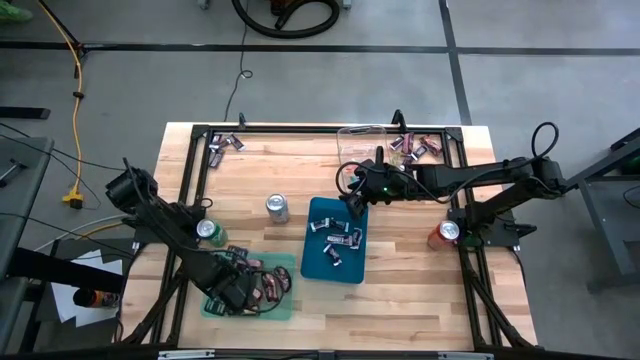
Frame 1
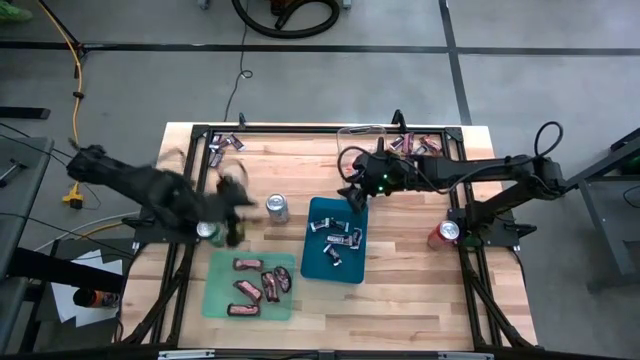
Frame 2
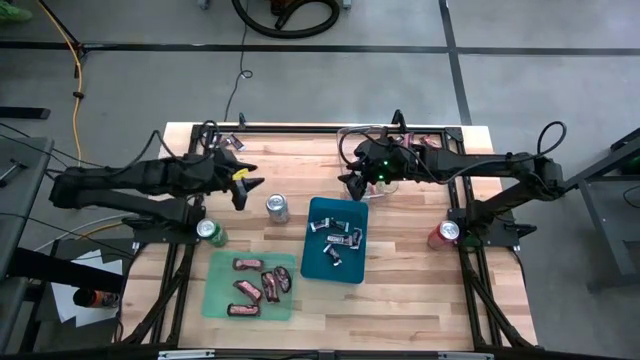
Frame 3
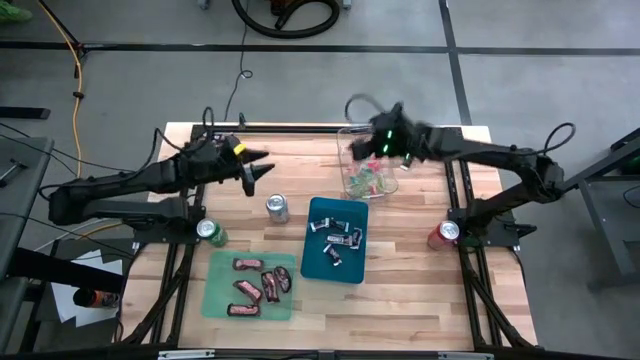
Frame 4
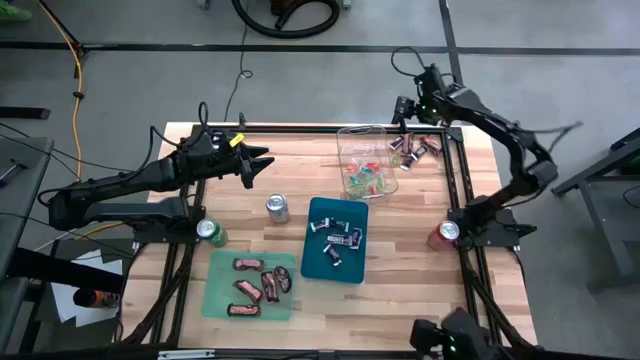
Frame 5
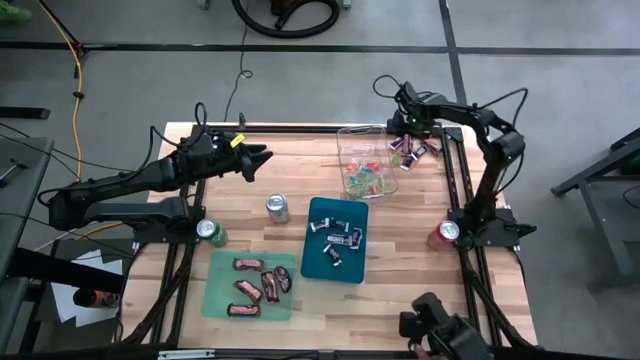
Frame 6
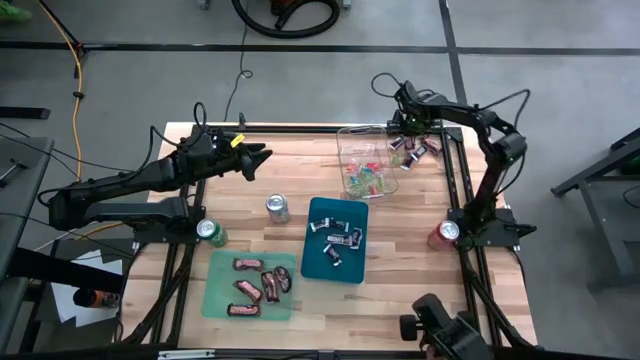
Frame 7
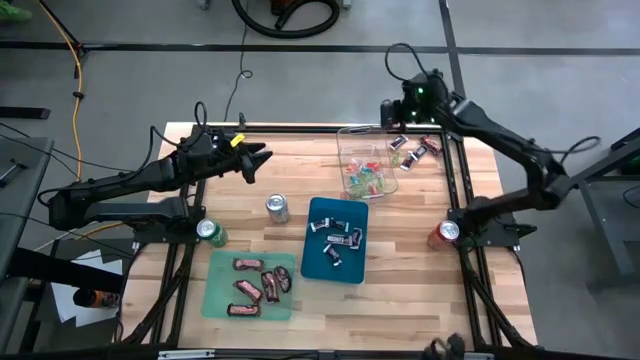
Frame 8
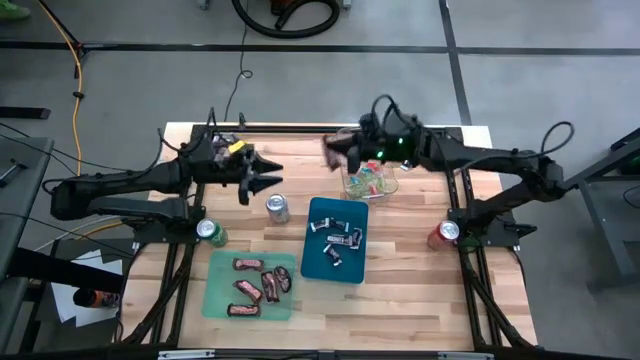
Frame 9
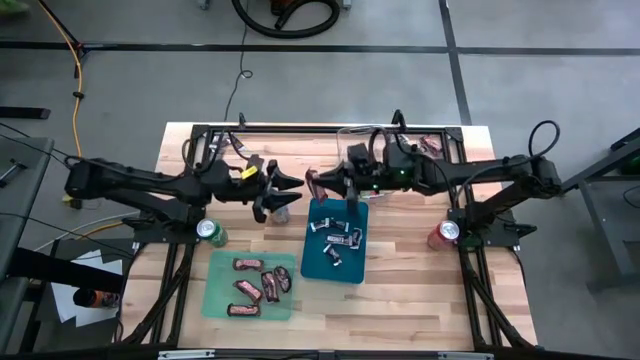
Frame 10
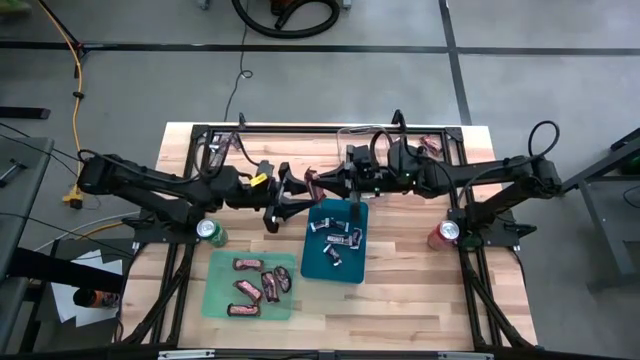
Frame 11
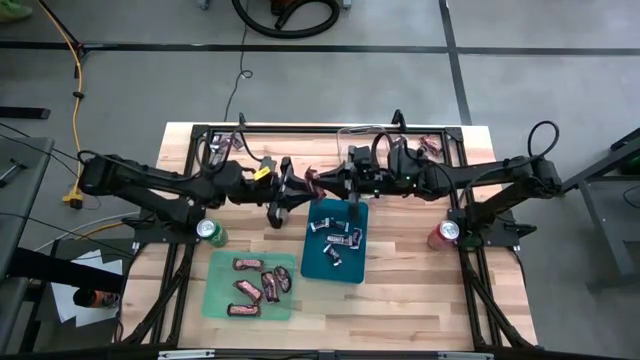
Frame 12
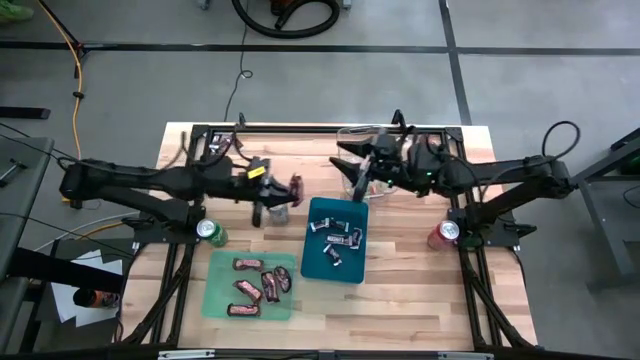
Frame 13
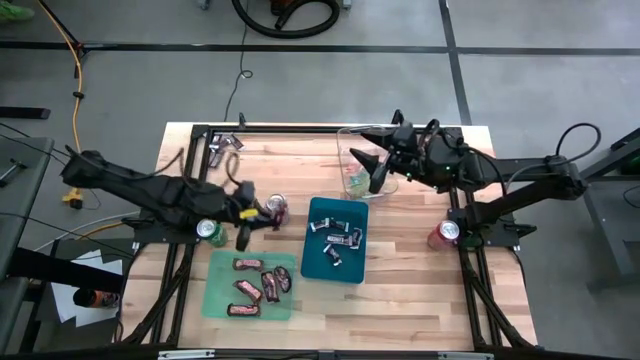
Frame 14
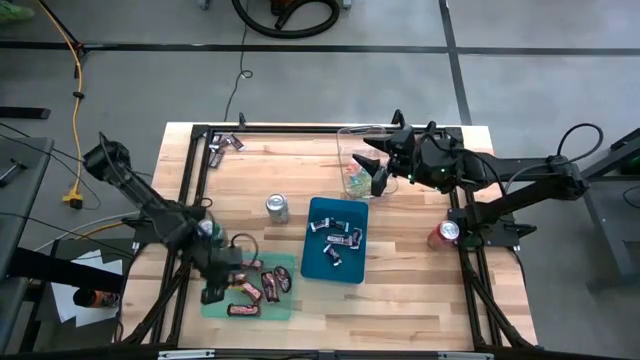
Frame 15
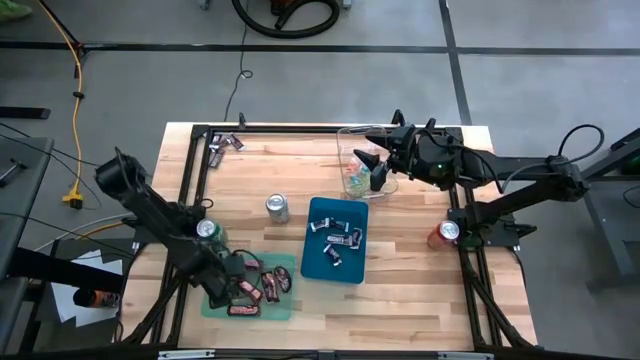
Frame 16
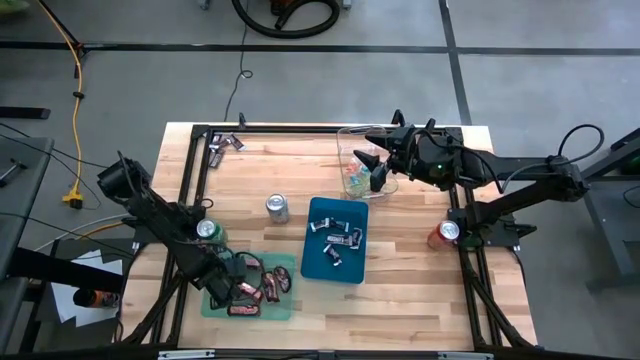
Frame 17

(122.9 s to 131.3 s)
Task: Sort candy
Put the brown chocolate into the green bin

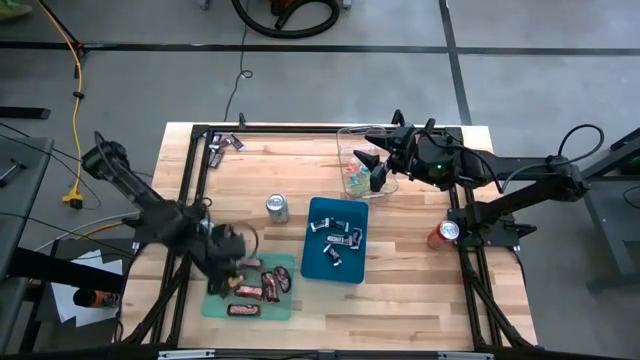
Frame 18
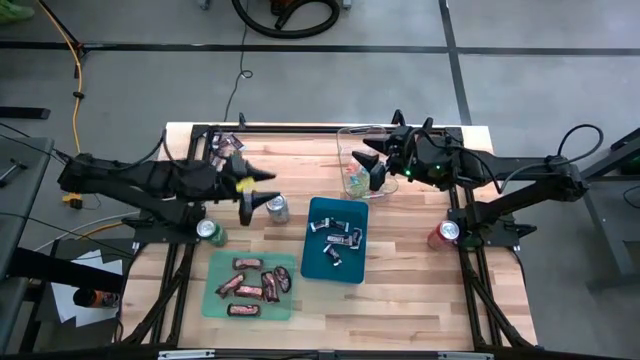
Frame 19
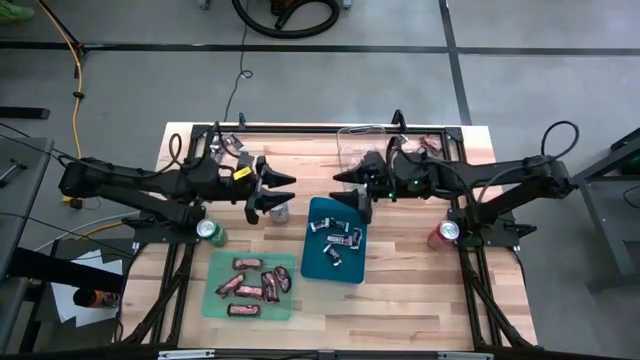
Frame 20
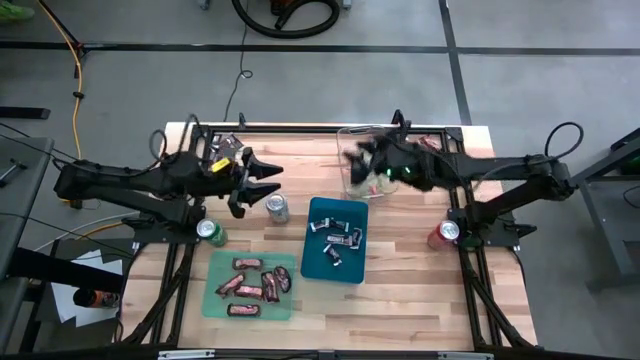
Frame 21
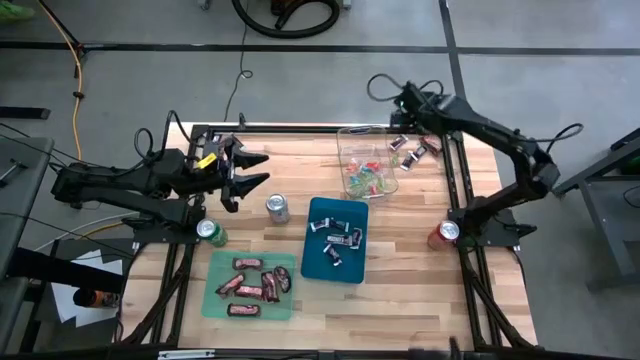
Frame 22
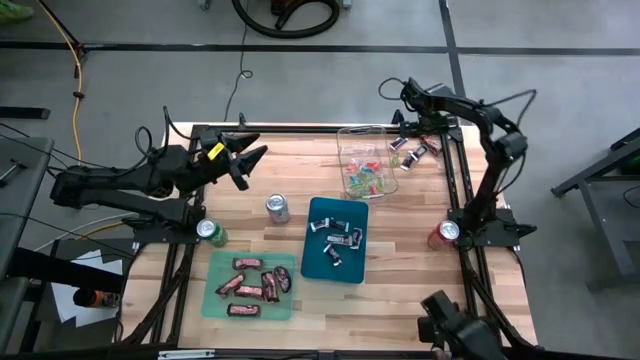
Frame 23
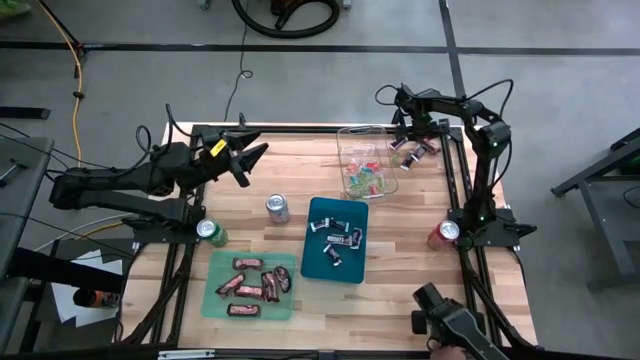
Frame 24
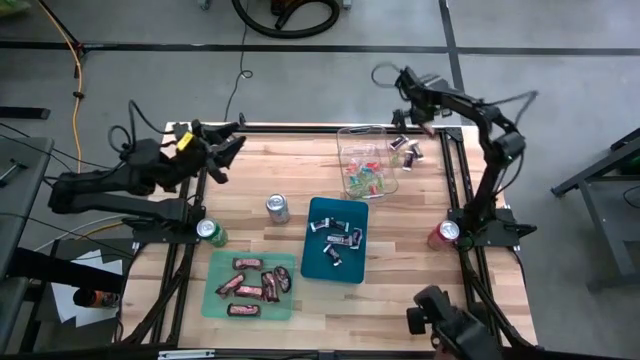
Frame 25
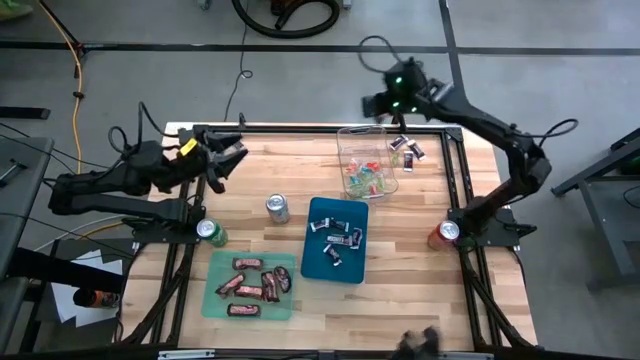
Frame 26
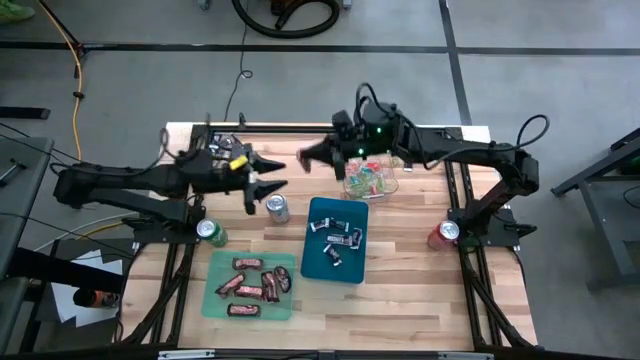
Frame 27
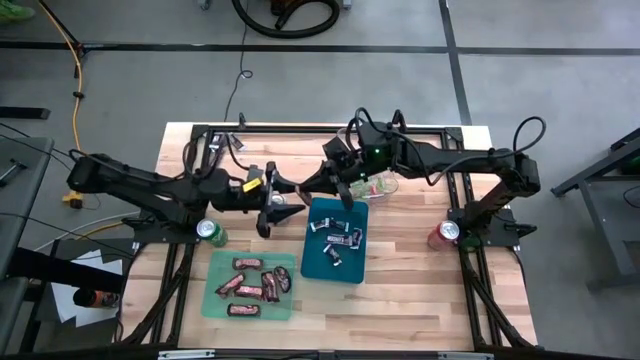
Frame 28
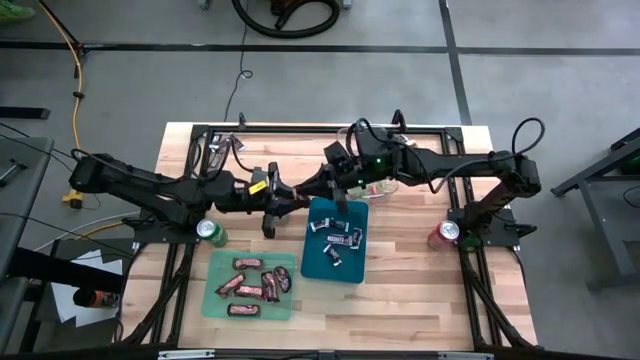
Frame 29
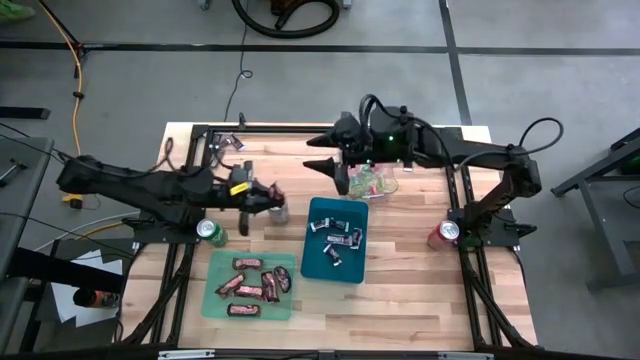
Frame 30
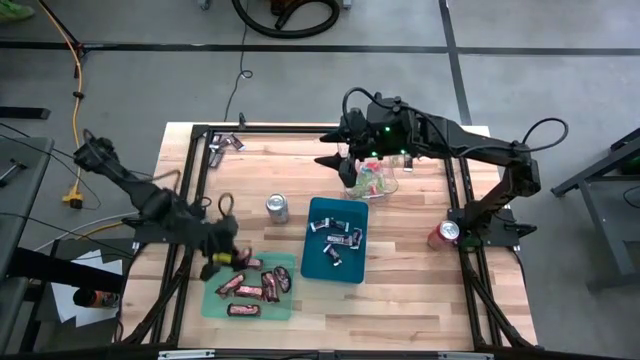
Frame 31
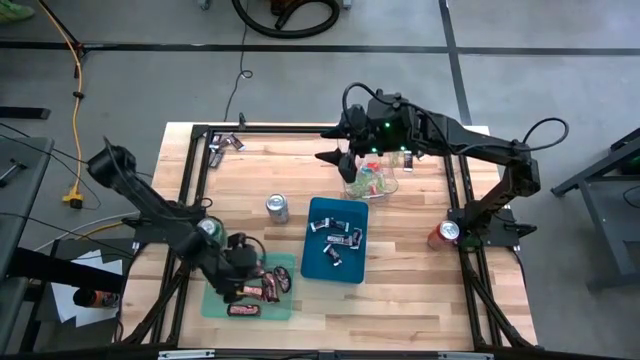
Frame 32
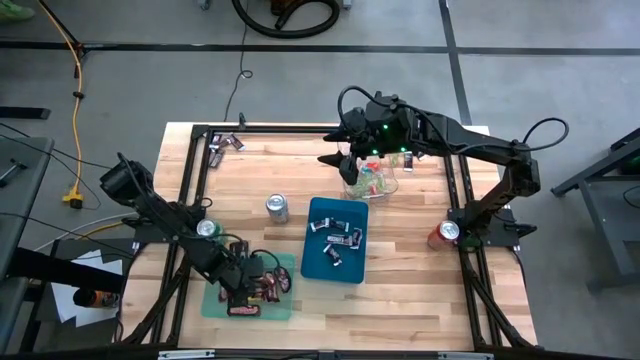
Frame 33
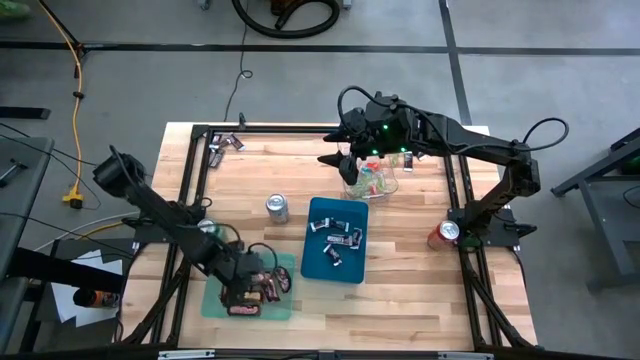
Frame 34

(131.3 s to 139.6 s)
Put the brown chocolate into the green bin

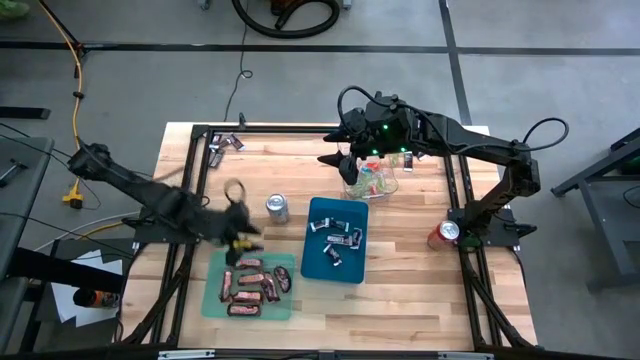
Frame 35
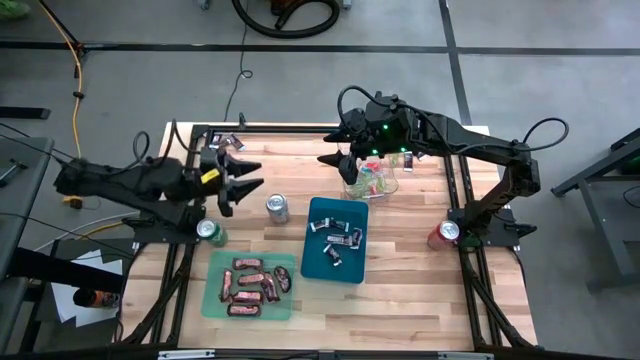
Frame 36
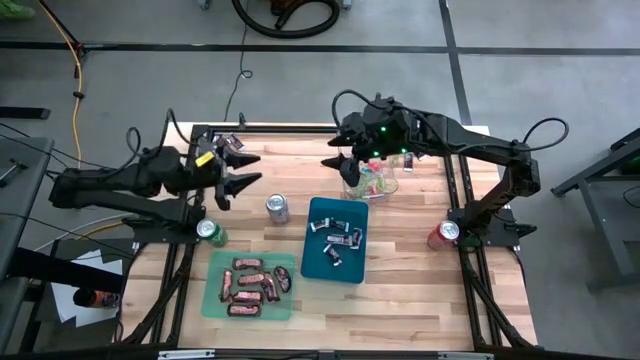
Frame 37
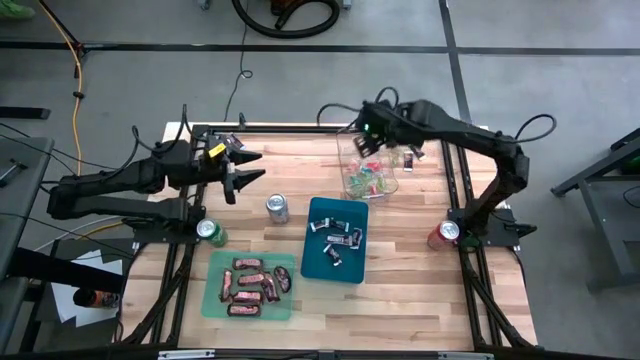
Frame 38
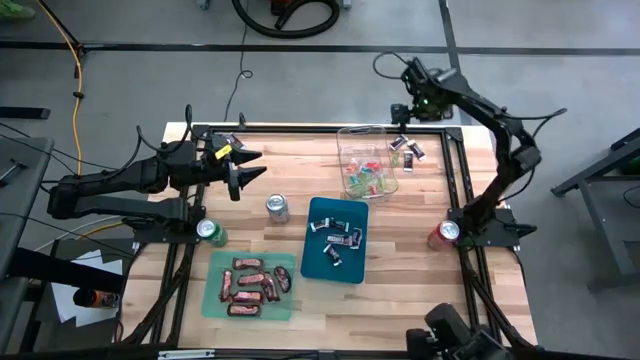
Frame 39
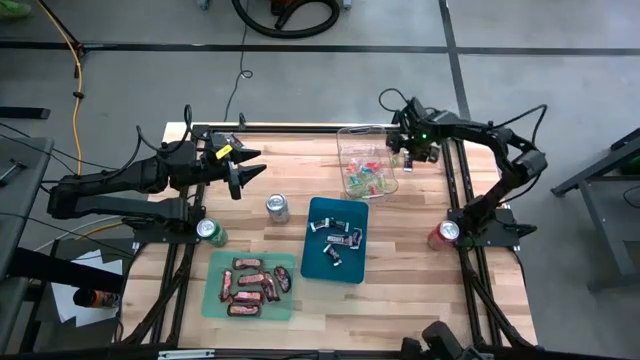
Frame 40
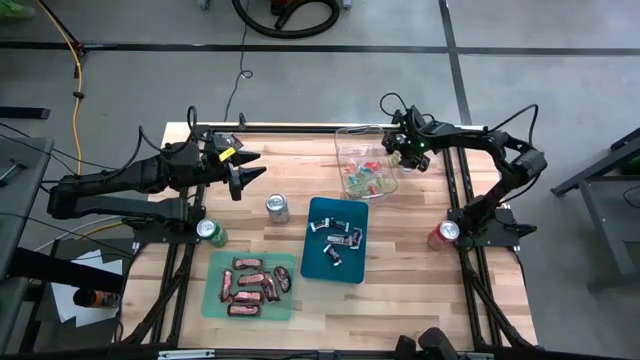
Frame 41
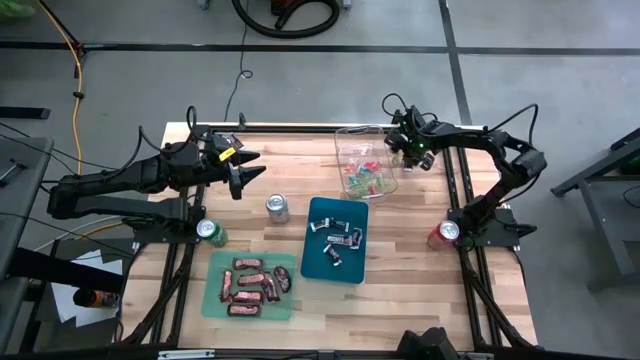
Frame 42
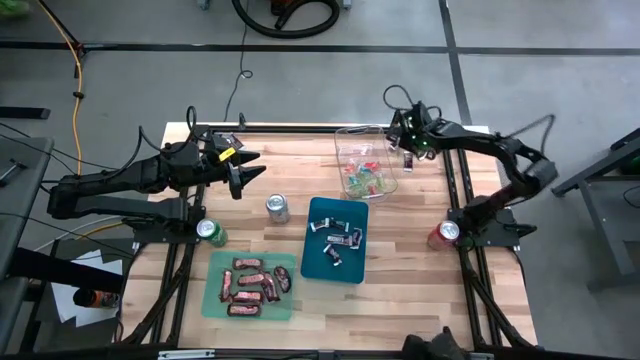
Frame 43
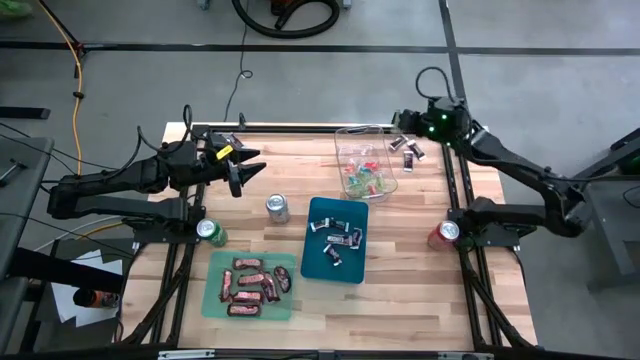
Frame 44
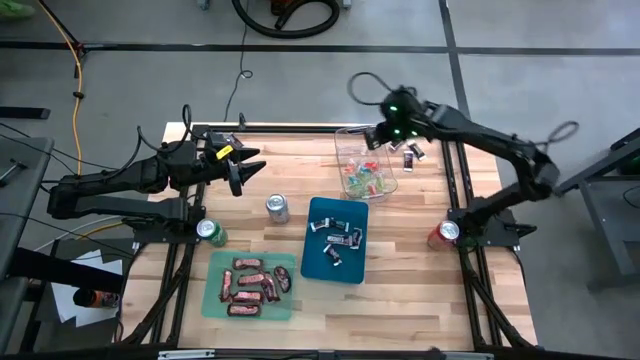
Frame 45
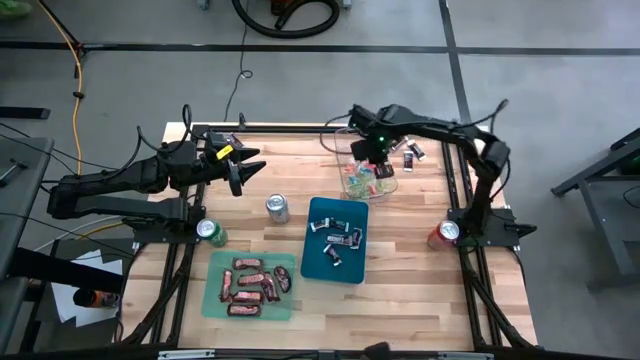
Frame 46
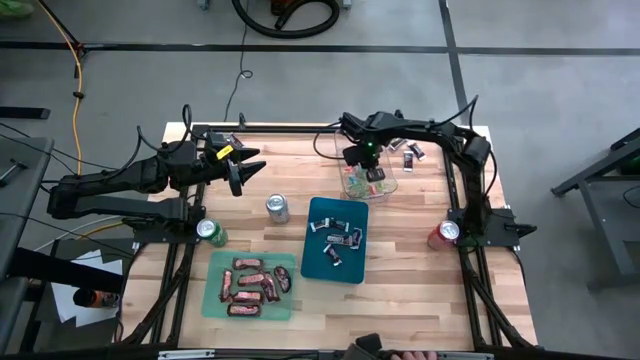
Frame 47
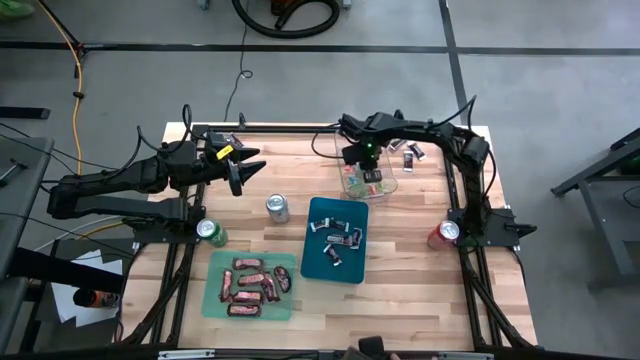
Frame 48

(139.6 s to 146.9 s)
Put the green gummy into the transparent bin
